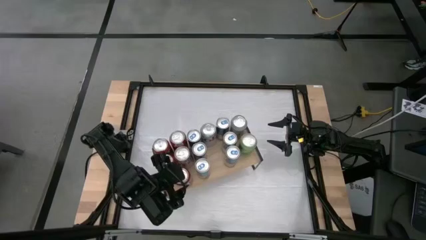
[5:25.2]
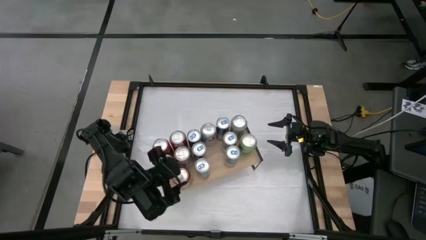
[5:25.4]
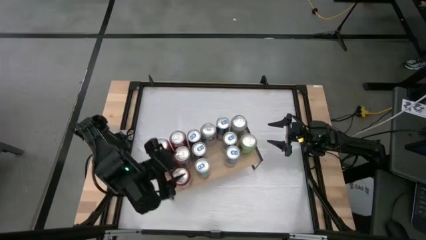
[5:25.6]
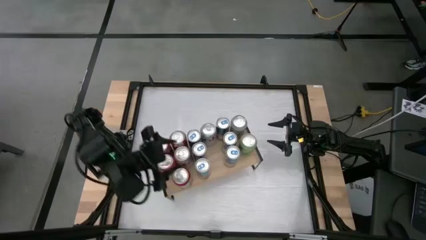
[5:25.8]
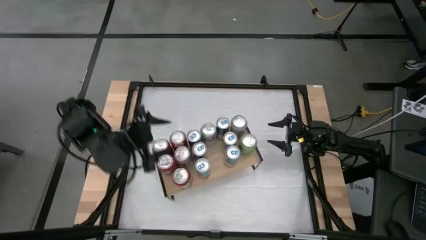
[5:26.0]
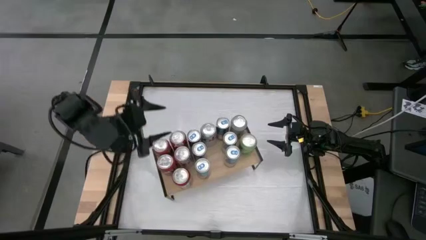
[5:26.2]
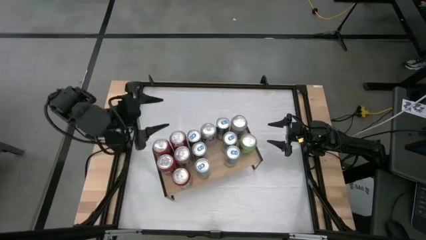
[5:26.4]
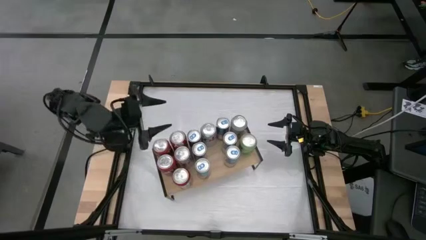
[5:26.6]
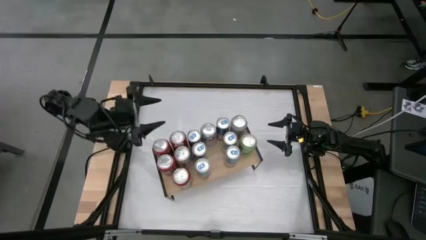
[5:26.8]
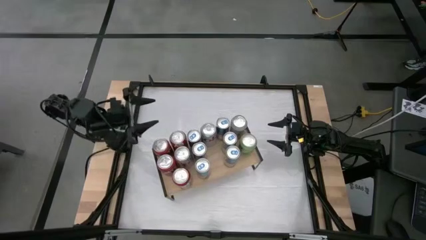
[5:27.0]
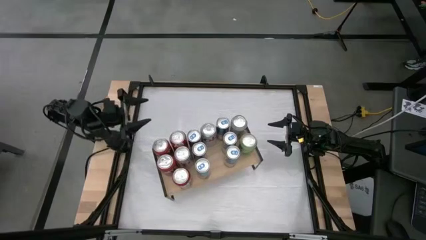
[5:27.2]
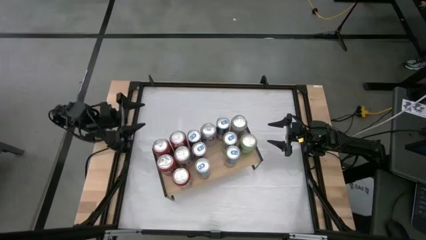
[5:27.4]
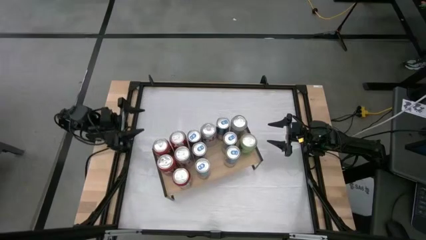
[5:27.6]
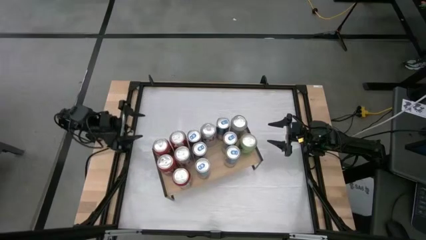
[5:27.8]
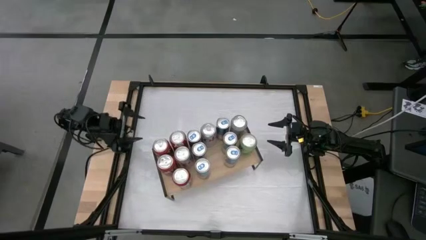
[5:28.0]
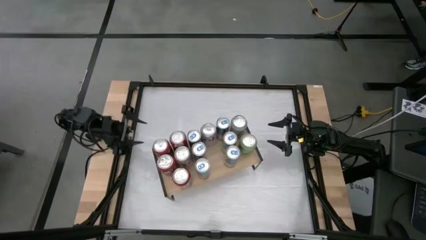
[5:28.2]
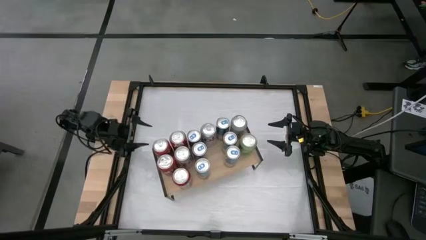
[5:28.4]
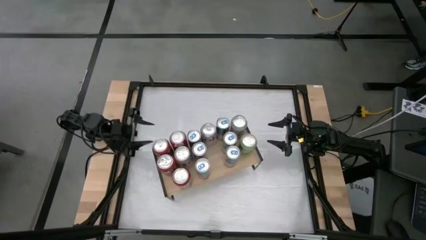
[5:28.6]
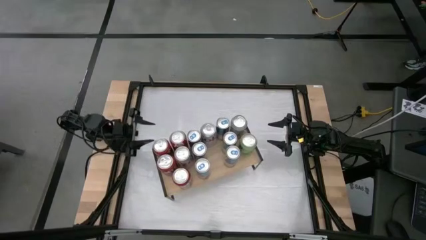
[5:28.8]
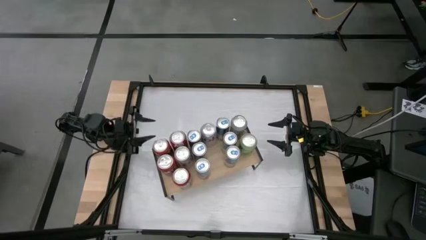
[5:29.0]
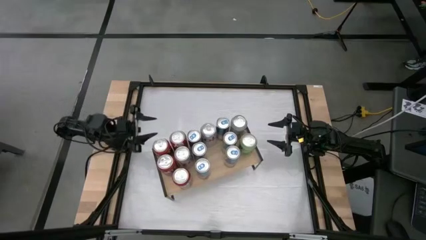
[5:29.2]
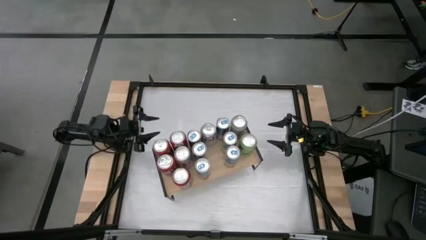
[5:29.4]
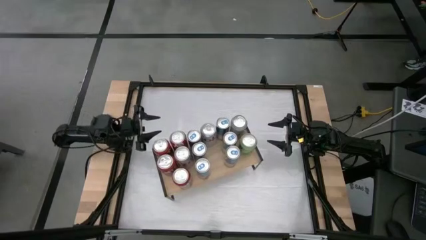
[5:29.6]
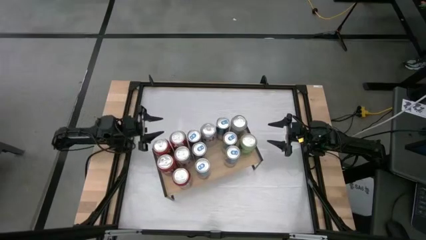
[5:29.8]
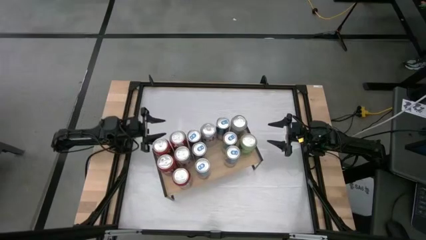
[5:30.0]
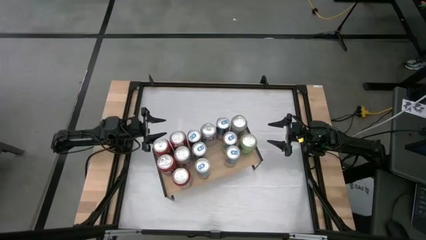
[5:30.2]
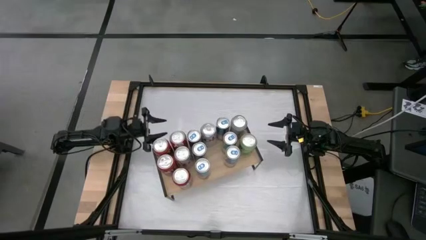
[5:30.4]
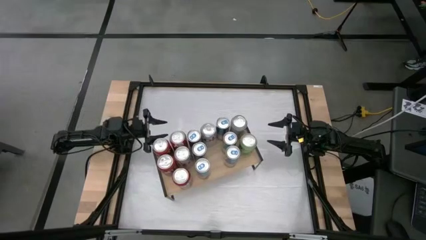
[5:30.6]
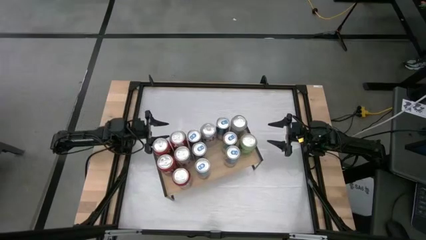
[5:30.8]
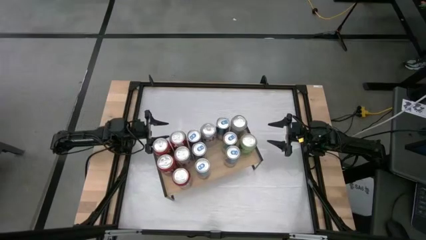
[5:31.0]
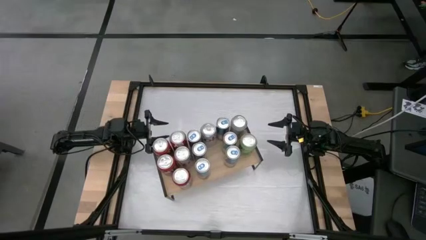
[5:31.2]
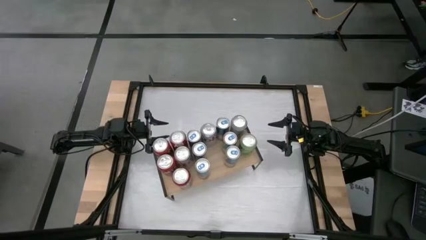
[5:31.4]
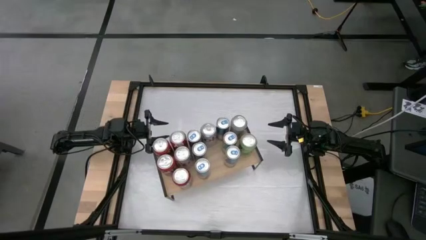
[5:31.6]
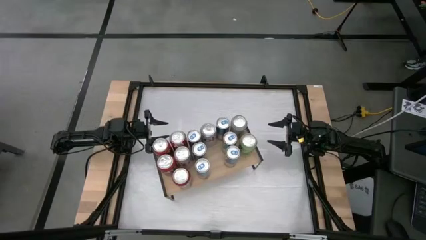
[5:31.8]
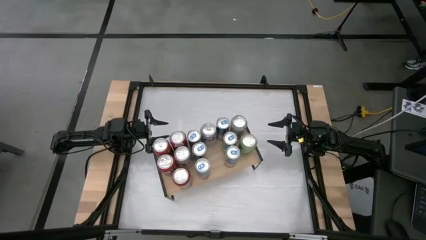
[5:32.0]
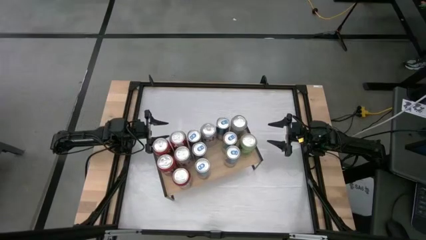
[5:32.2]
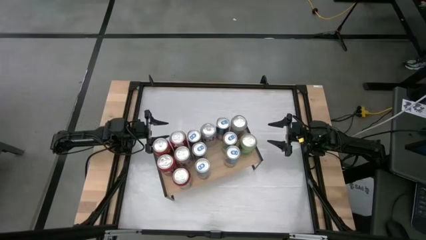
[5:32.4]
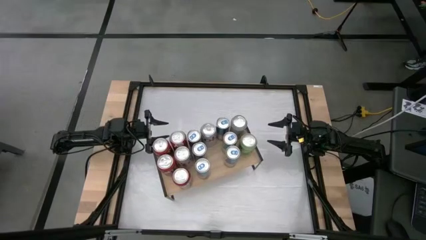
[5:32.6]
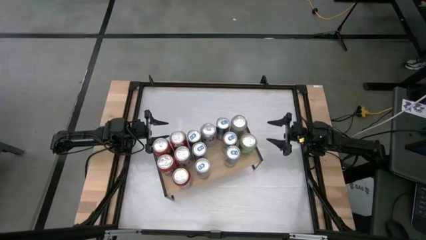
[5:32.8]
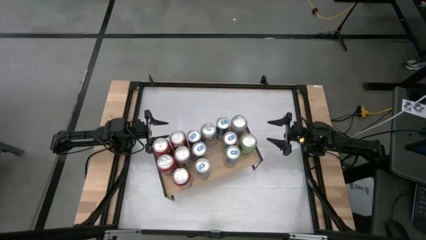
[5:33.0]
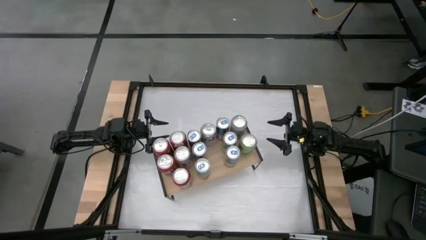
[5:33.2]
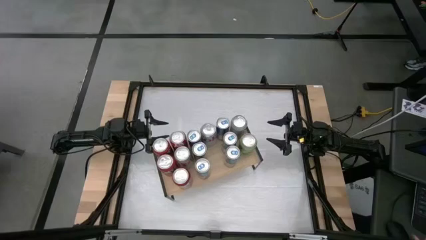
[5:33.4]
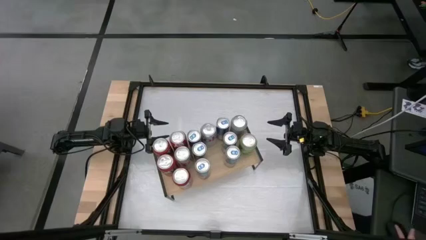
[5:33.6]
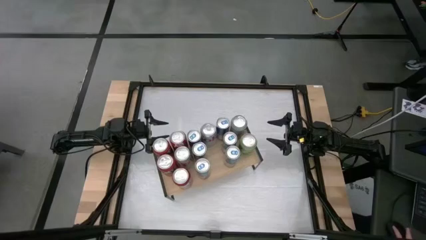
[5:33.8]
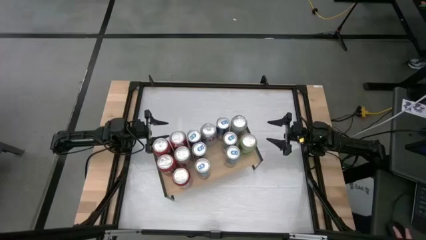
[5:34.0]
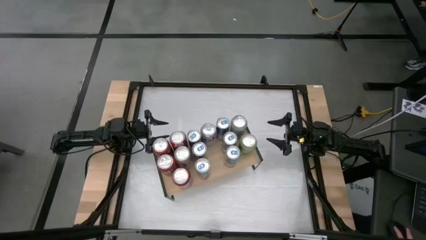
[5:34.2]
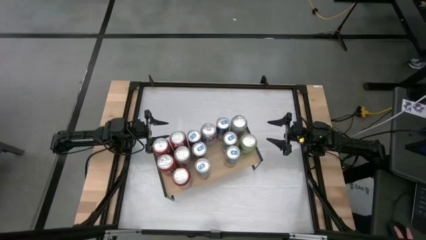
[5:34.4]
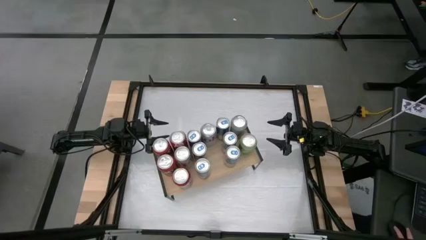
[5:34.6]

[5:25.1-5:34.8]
Task: Place canned beverage on shelf
Return to Home Position

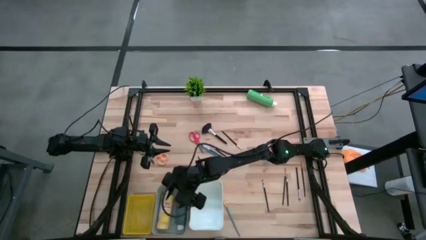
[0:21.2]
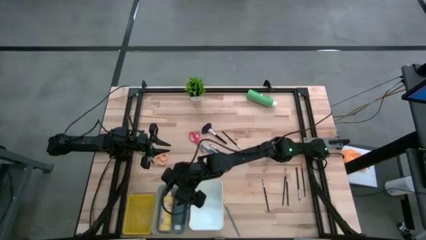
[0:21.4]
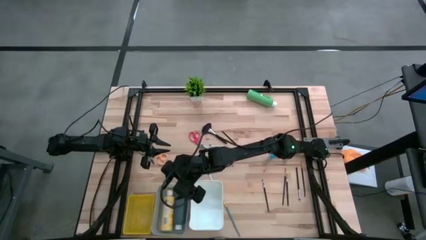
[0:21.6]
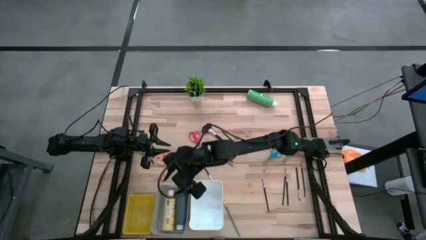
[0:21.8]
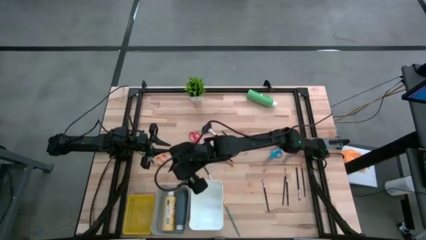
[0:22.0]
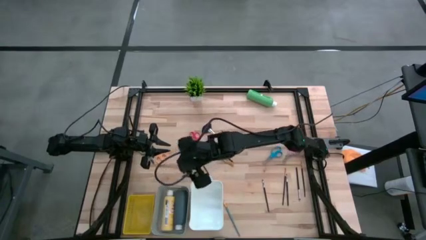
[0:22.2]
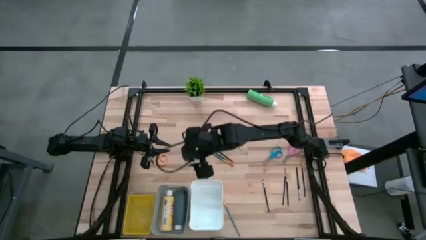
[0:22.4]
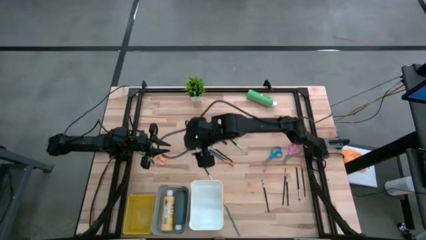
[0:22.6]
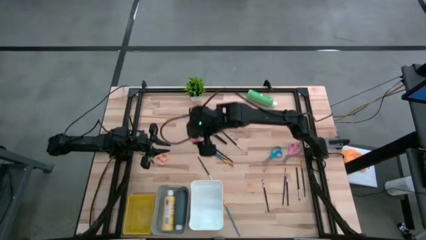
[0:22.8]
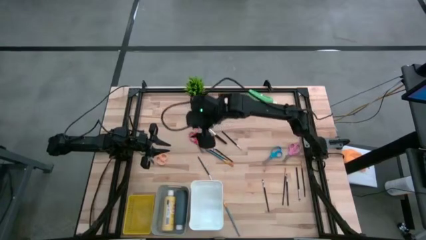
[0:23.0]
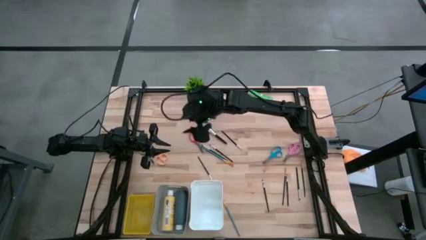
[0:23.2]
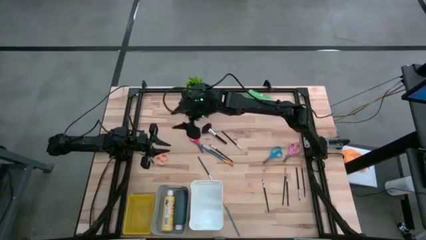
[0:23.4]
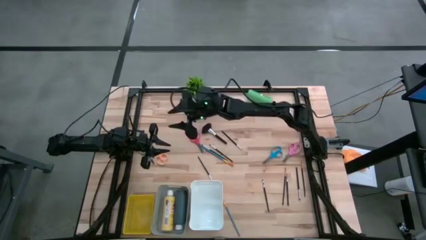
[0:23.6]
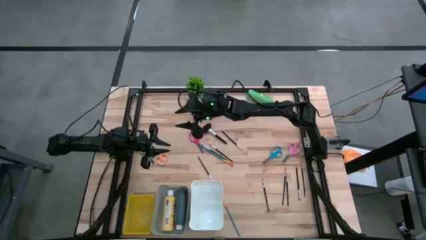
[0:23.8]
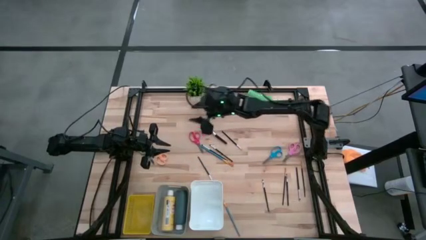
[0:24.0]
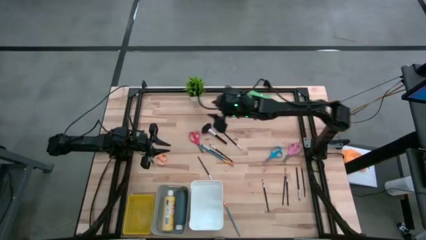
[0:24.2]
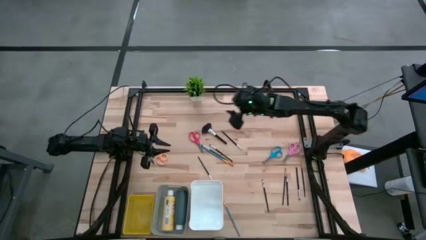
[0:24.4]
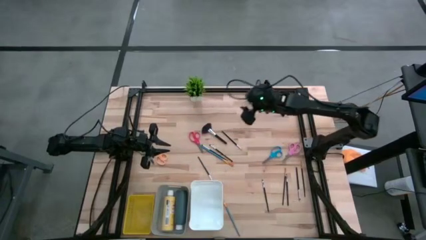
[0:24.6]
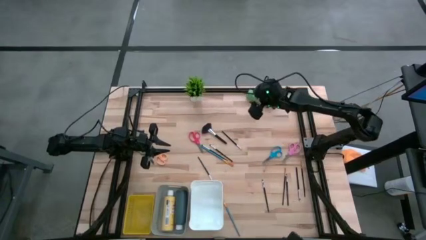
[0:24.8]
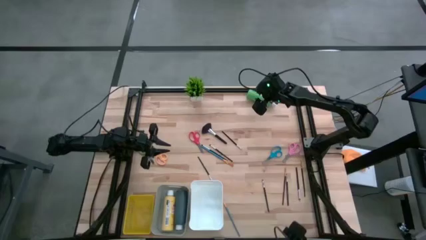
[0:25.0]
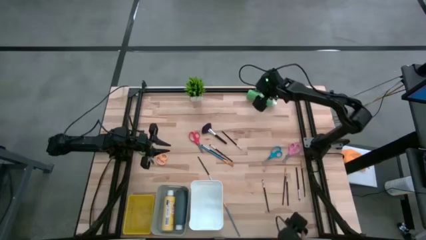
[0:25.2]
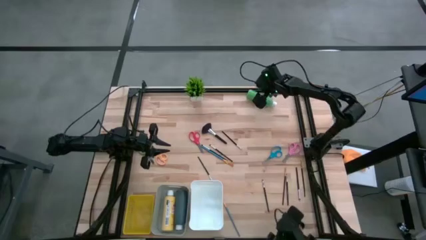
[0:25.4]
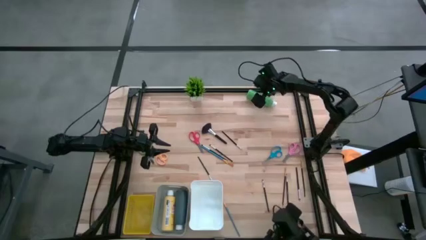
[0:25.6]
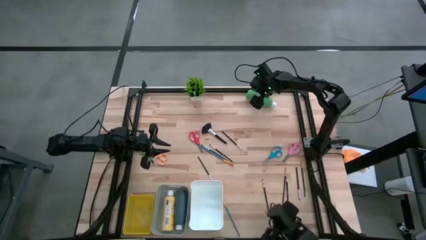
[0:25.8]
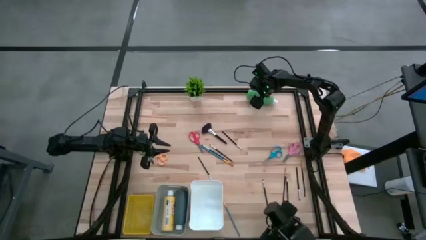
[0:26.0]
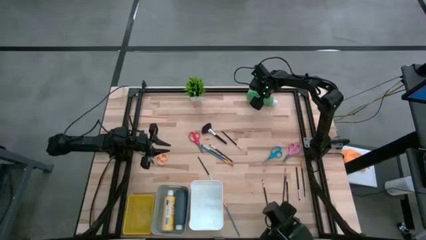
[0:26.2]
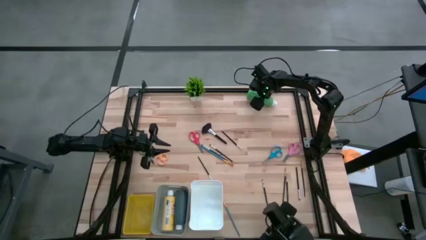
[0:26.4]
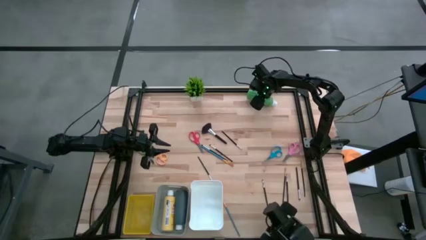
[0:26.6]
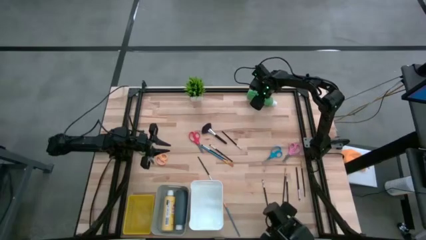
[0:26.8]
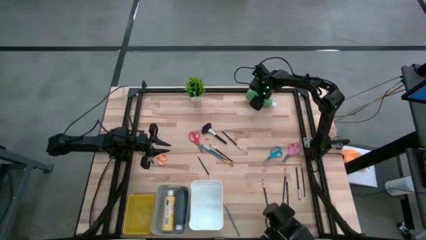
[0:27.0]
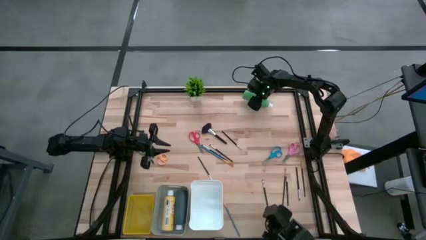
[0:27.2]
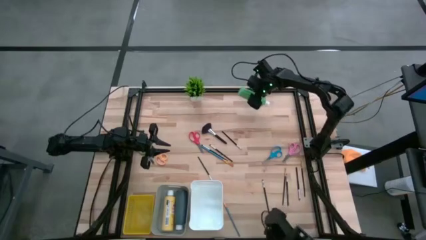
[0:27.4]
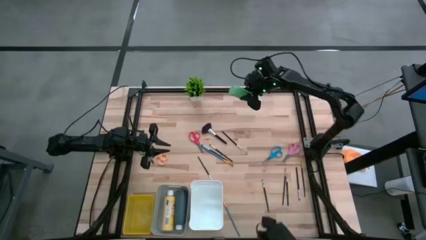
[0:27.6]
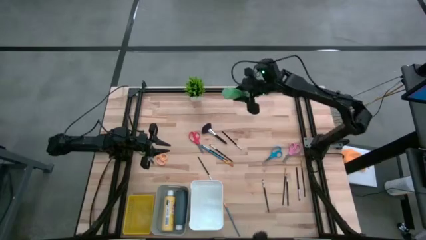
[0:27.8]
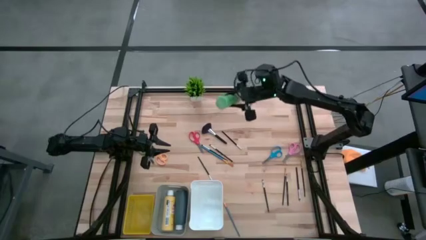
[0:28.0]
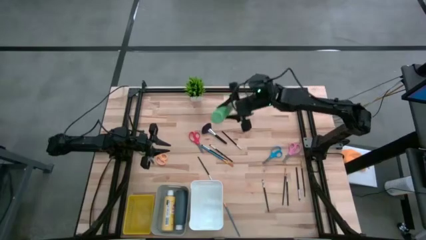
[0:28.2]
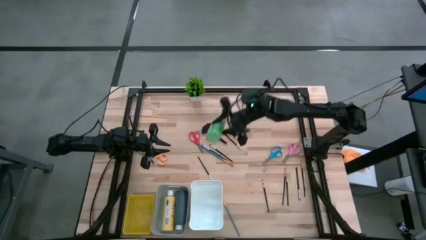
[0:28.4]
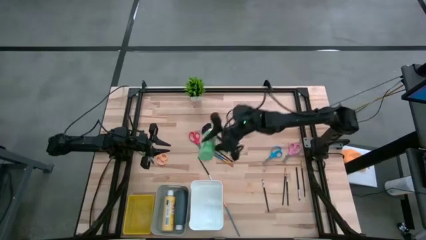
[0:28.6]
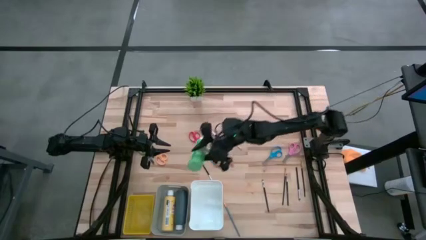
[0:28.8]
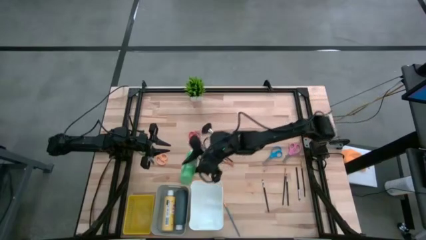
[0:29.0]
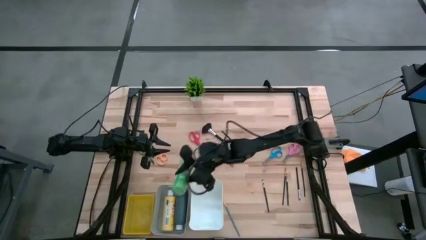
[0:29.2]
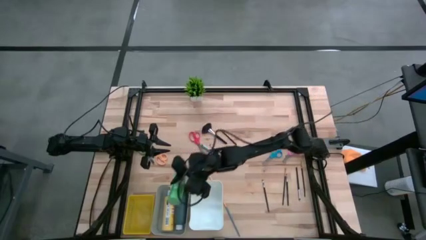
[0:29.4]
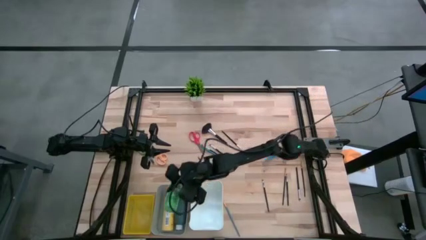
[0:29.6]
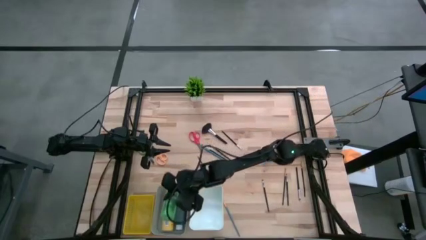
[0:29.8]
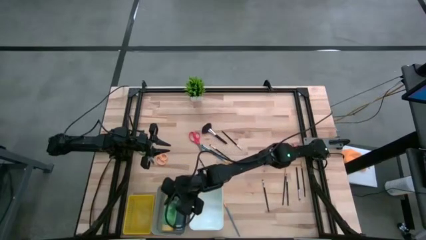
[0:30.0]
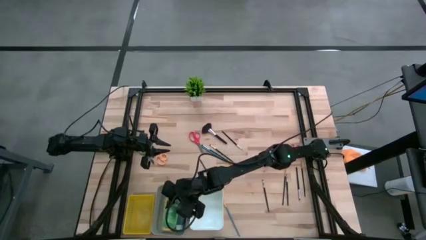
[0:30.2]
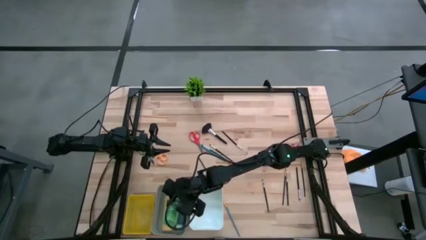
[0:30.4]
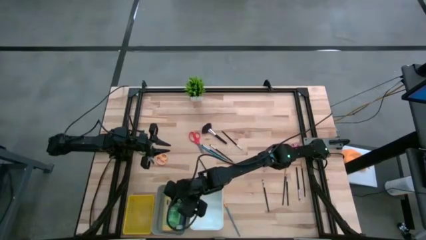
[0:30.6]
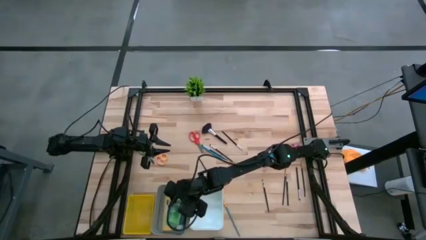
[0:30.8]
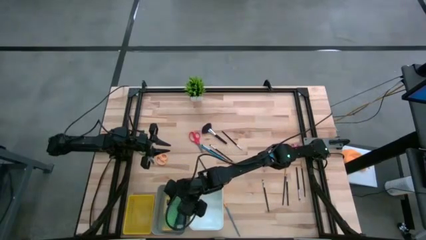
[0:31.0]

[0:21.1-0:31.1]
Task: Pick & Place Paint Supplies
Put the green paint bottle into the gray bin
